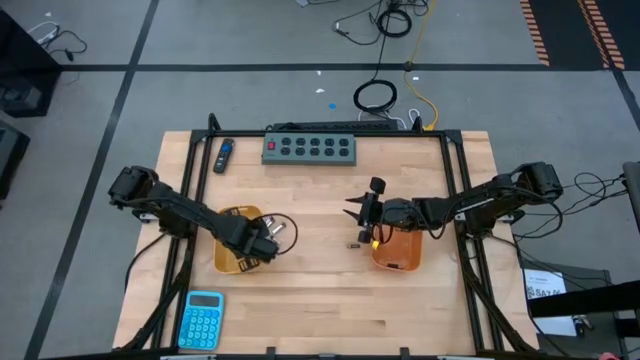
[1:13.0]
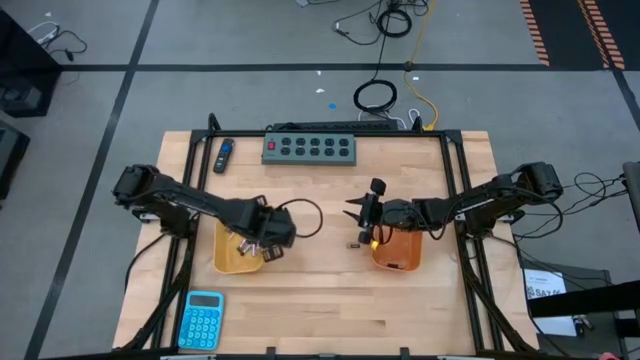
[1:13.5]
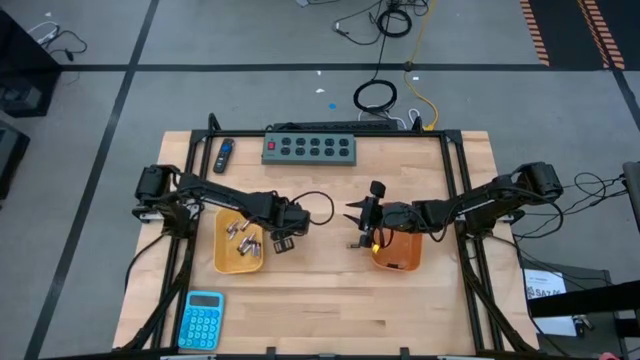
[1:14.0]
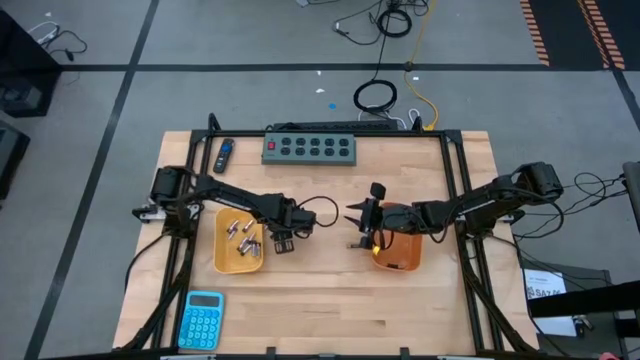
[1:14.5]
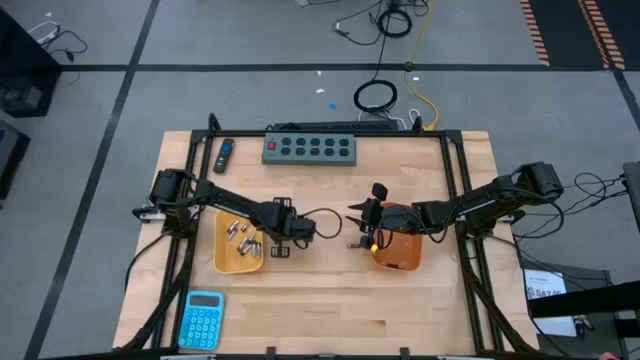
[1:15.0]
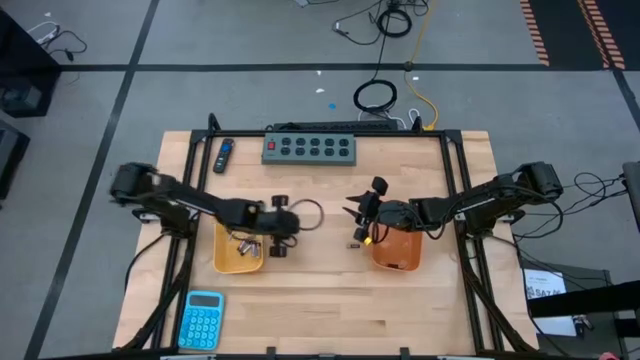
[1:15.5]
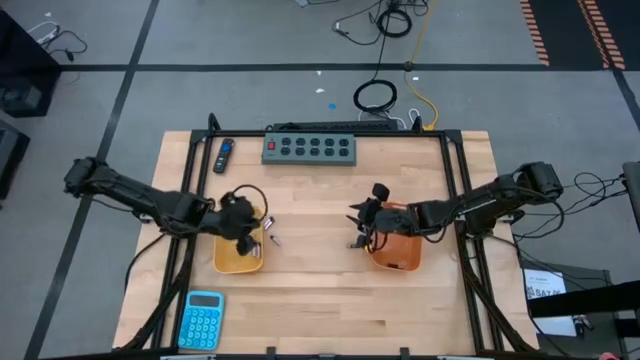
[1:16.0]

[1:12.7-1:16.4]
Task: Sort batteries
Put the white battery into the yellow bin

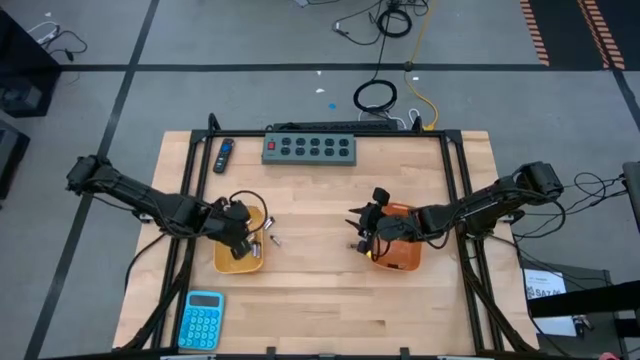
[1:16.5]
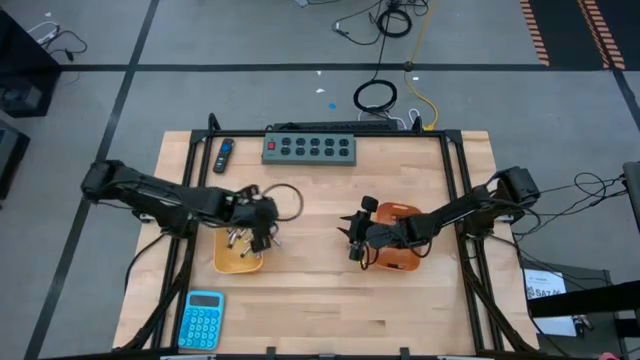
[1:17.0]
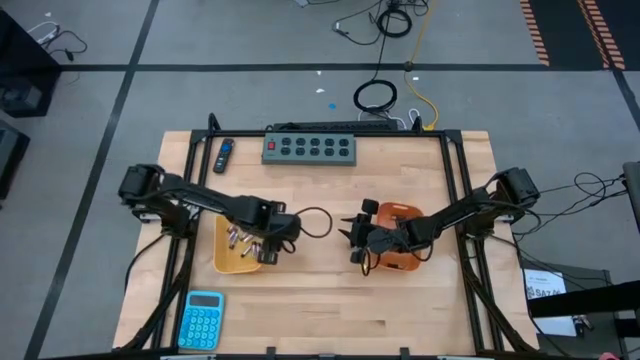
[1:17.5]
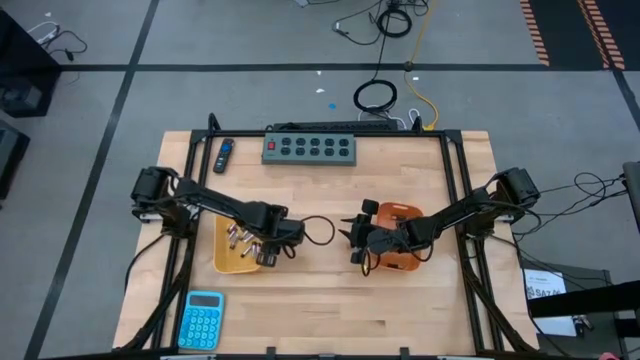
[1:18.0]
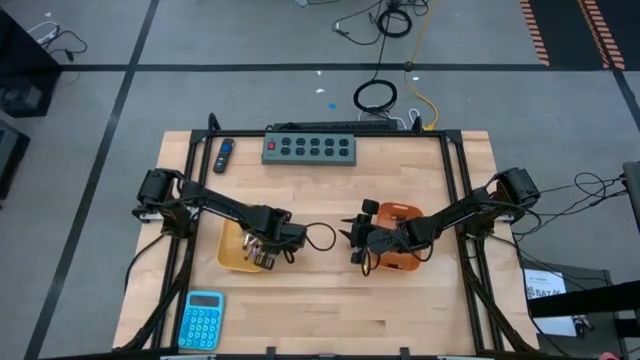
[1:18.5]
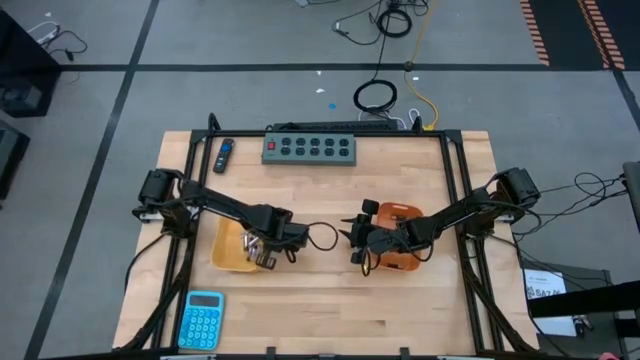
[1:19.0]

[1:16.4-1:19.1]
Put the white battery into the yellow bin

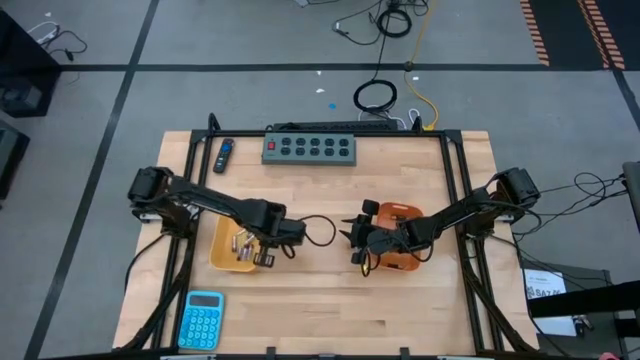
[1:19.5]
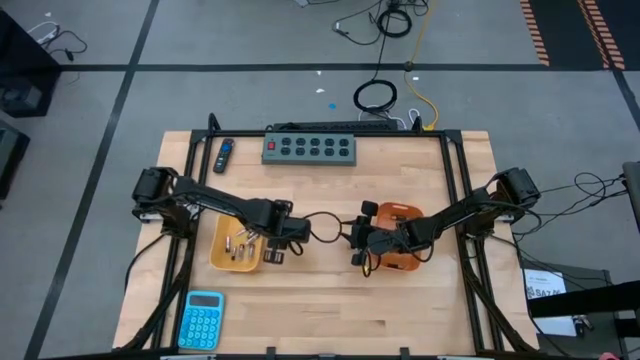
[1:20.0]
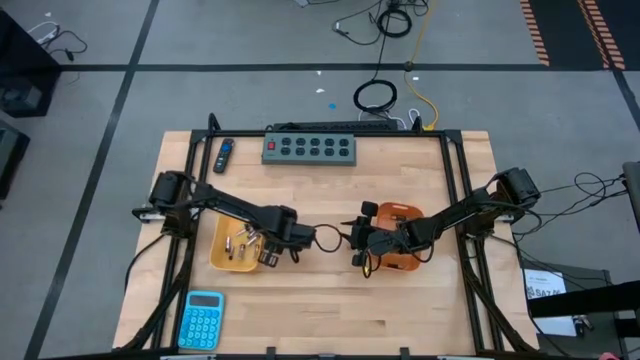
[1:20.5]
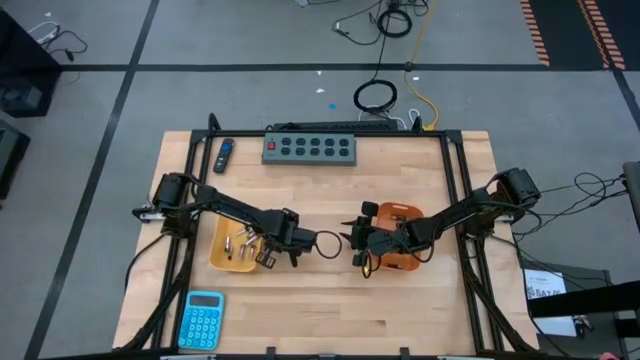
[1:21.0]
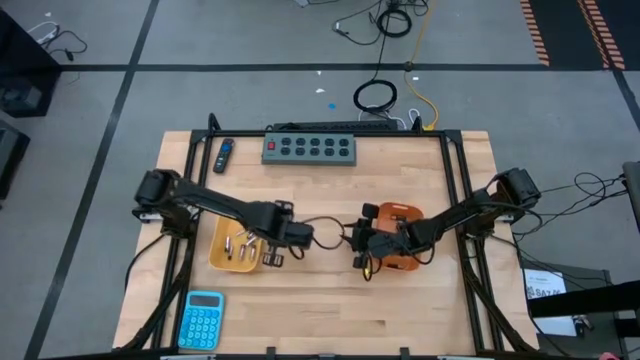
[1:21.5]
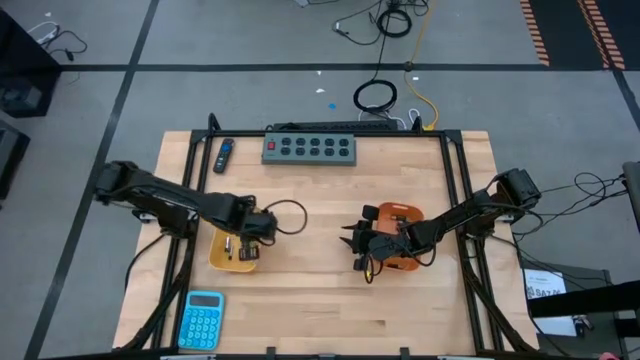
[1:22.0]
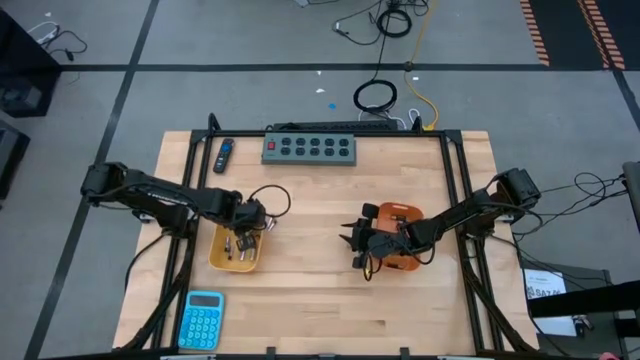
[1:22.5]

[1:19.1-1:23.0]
Put the white battery into the yellow bin

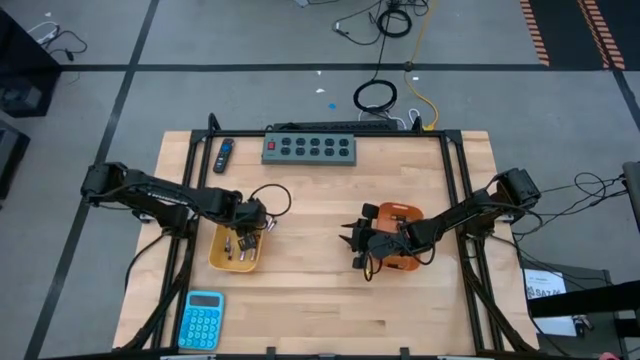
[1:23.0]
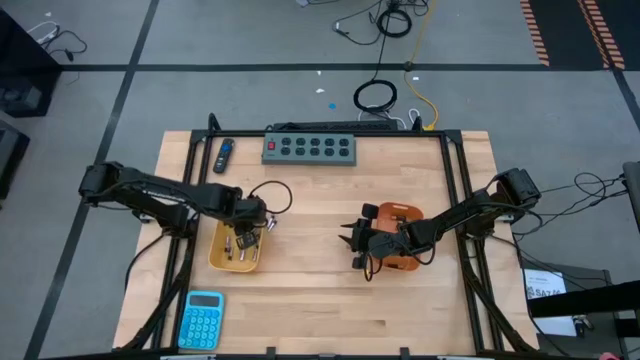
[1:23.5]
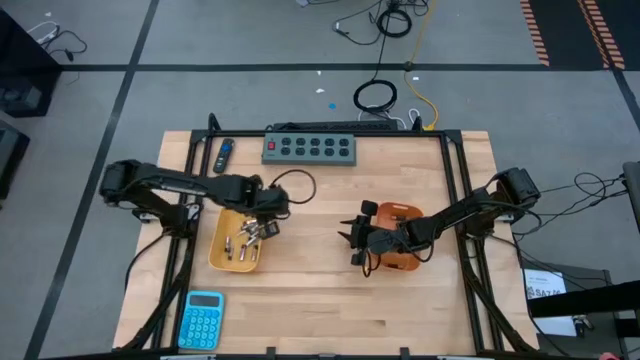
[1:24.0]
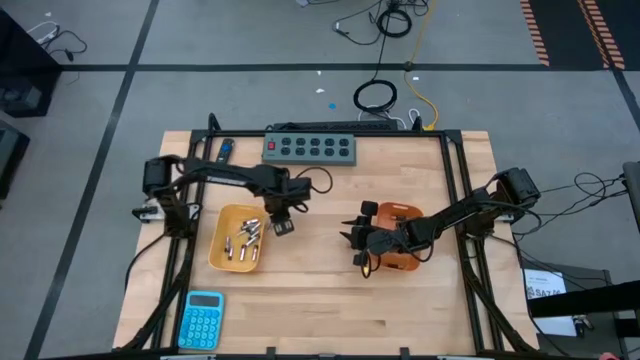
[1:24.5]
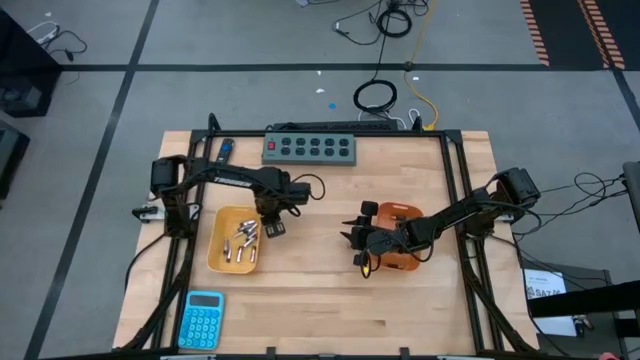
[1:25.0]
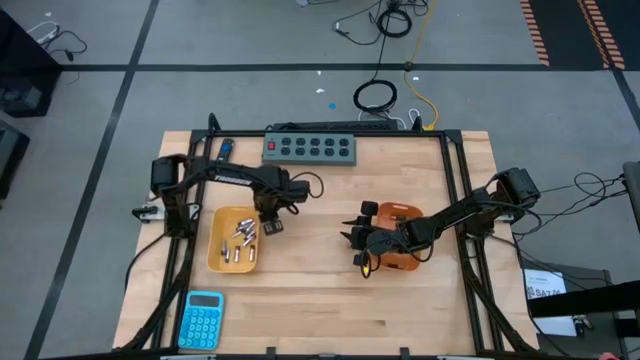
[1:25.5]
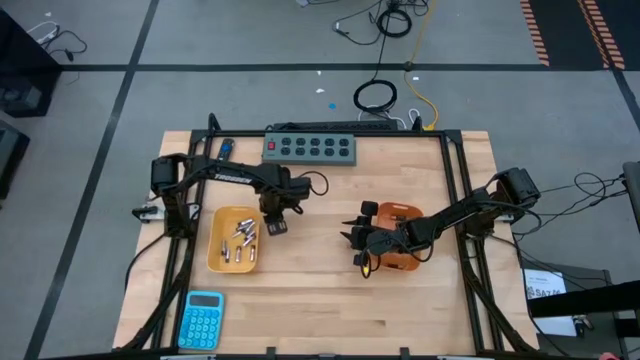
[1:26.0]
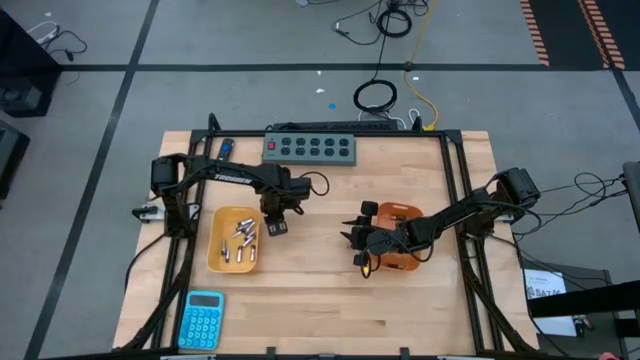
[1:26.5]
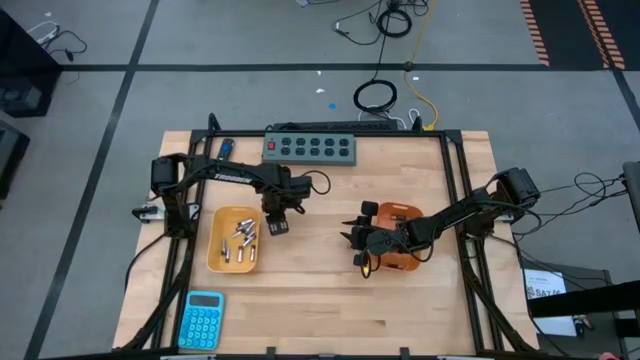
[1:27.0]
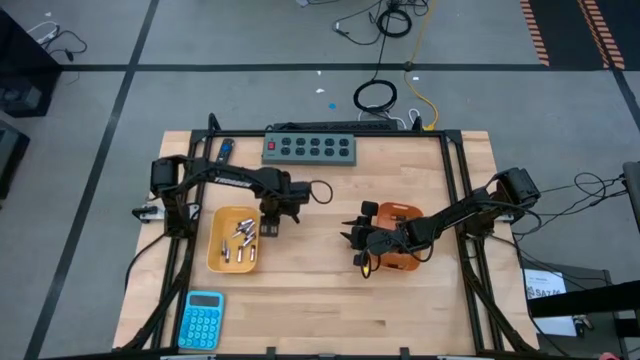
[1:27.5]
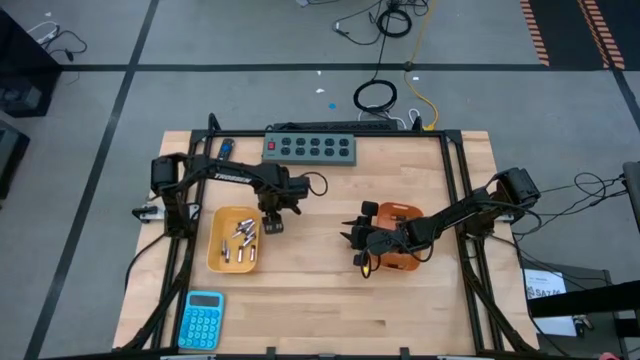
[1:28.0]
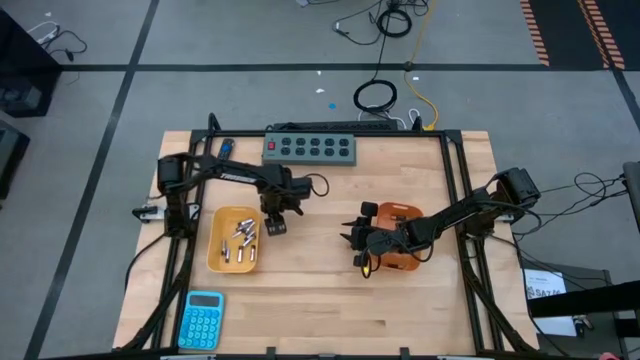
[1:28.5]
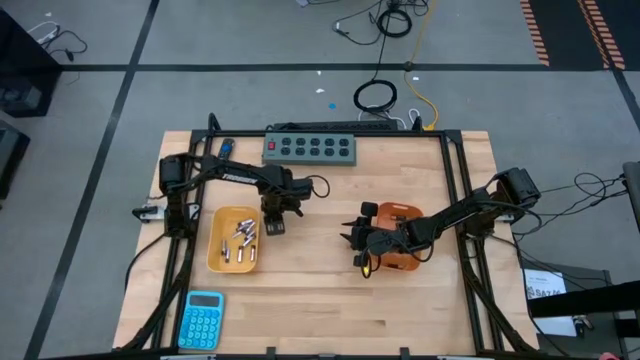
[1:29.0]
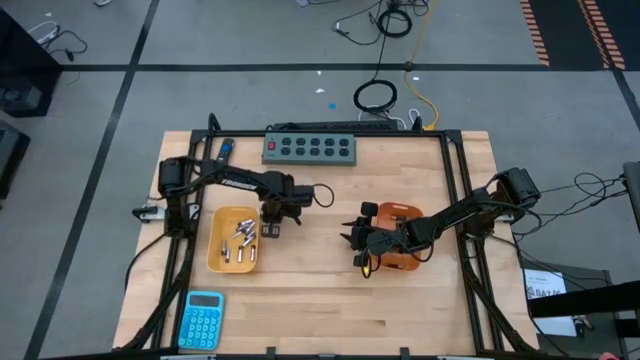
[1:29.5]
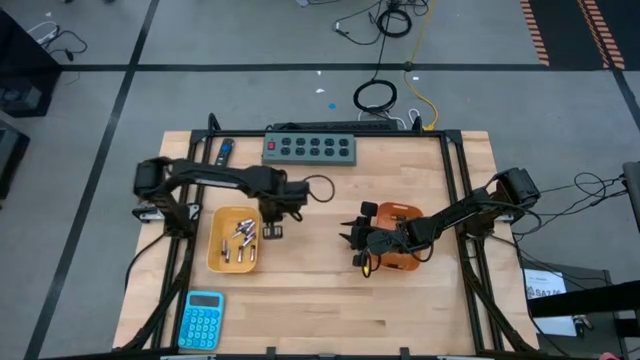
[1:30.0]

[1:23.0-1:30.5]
Put the white battery into the yellow bin

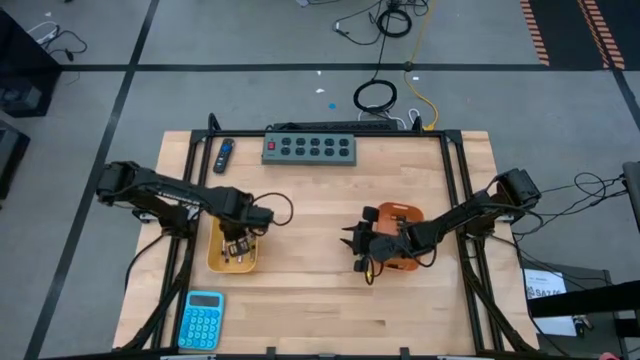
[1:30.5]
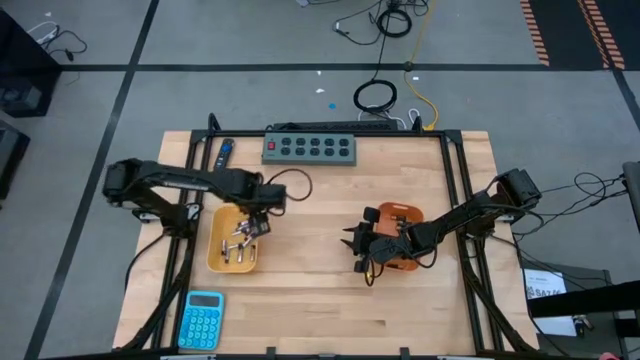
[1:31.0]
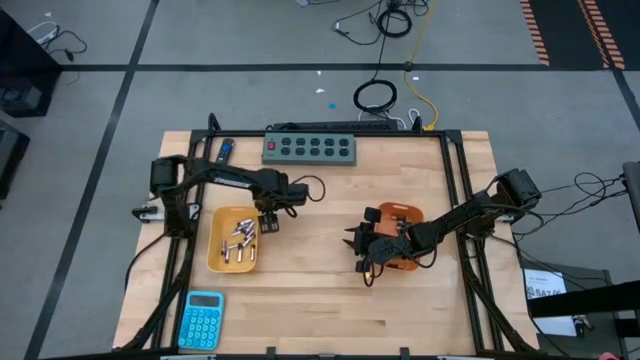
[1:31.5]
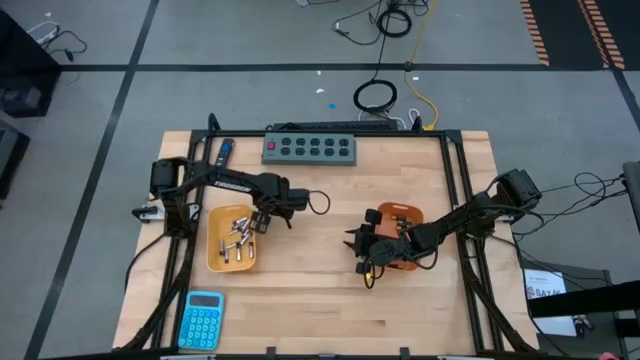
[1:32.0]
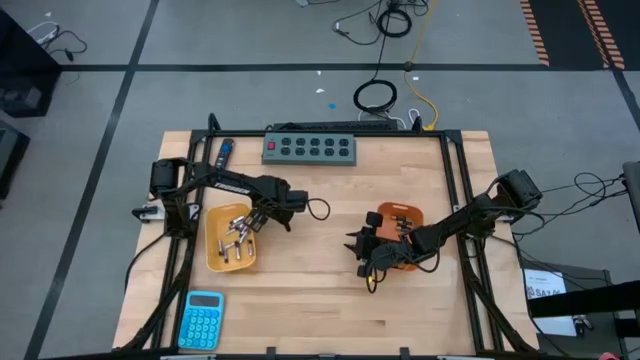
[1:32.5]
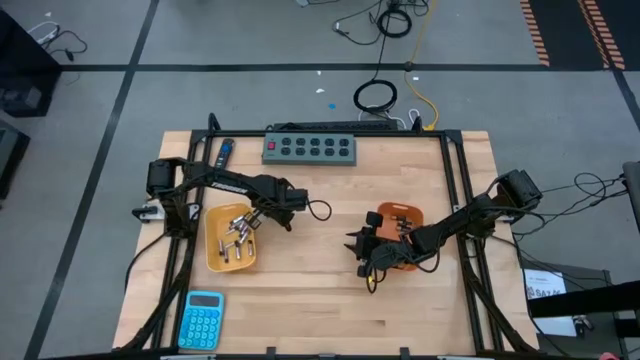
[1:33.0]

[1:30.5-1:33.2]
Put the white battery into the yellow bin

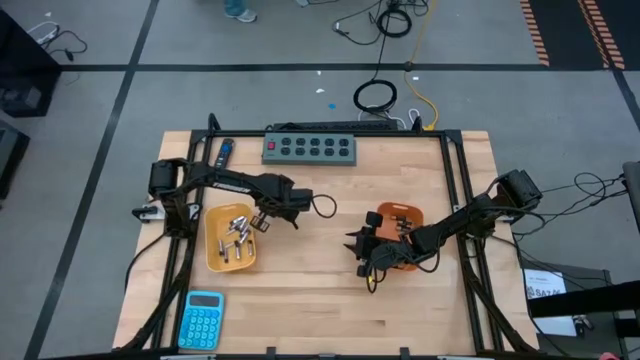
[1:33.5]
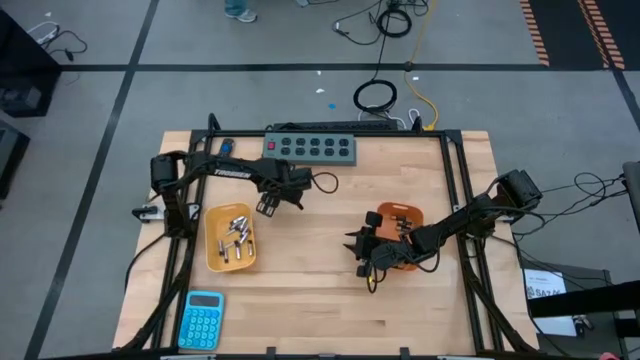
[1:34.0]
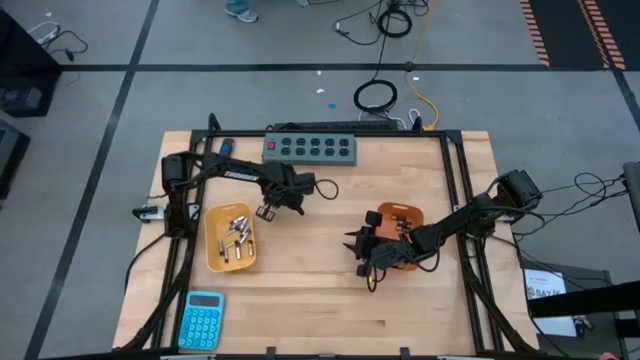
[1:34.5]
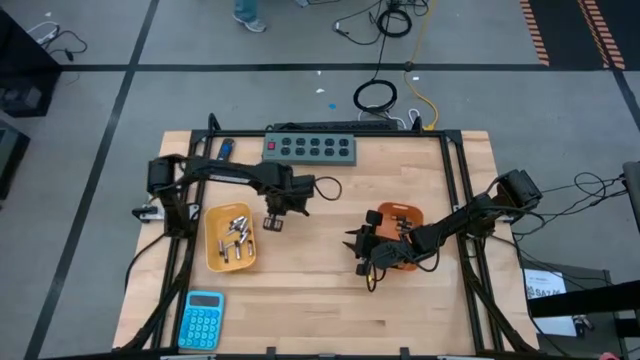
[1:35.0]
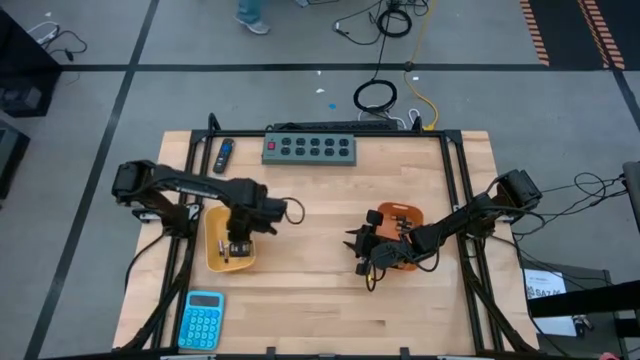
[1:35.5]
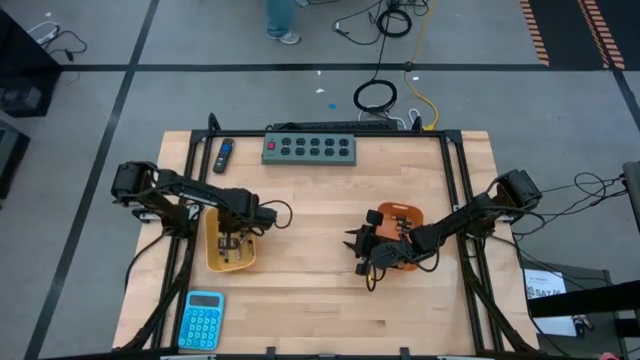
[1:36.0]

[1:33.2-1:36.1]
Put the white battery into the yellow bin
